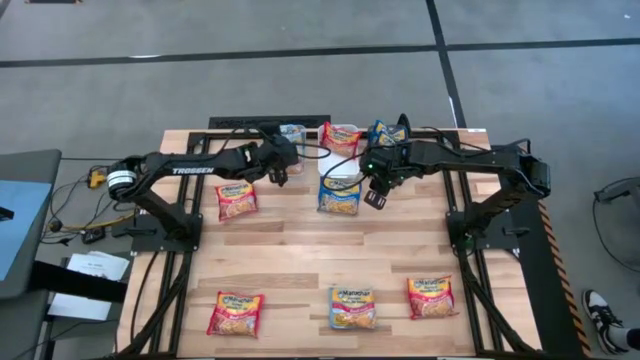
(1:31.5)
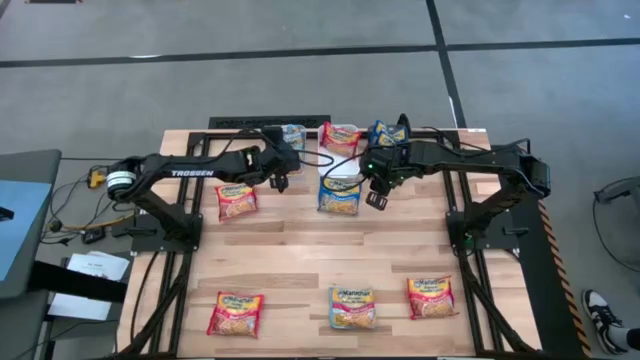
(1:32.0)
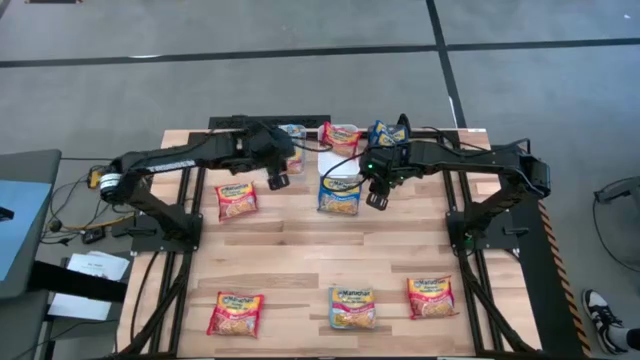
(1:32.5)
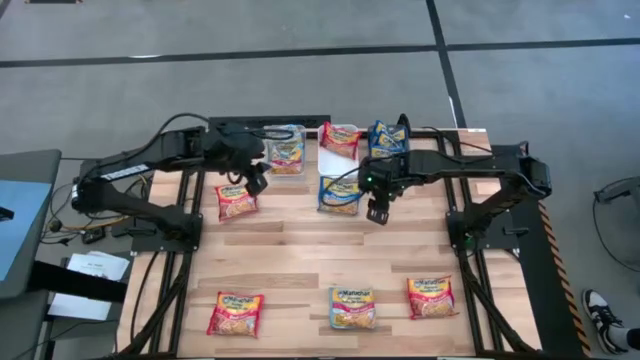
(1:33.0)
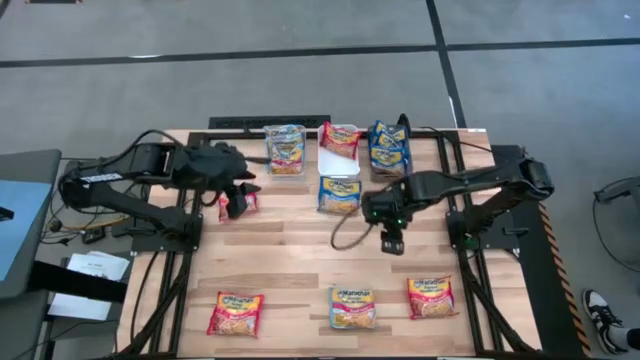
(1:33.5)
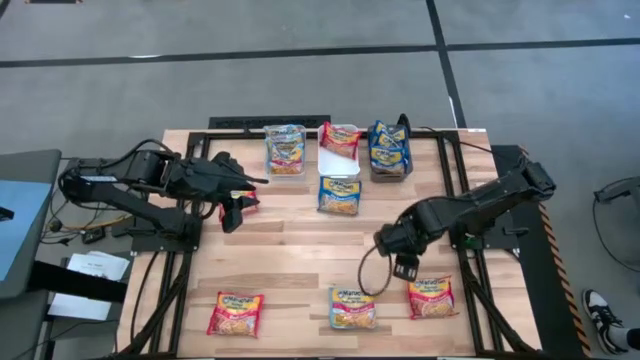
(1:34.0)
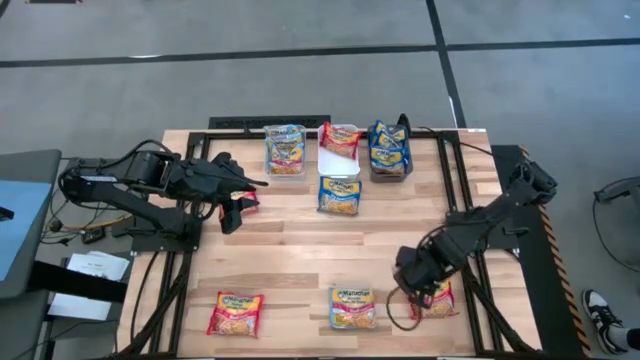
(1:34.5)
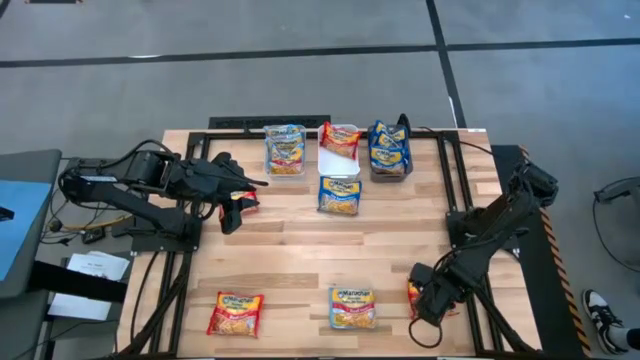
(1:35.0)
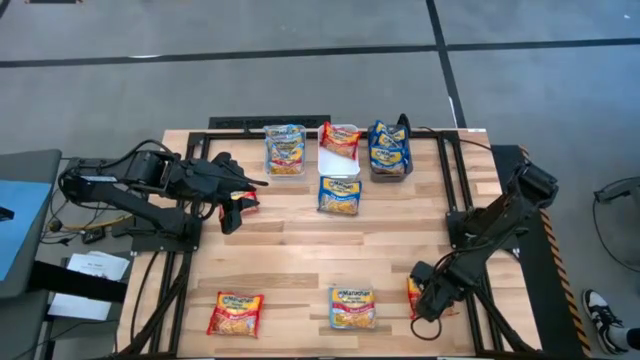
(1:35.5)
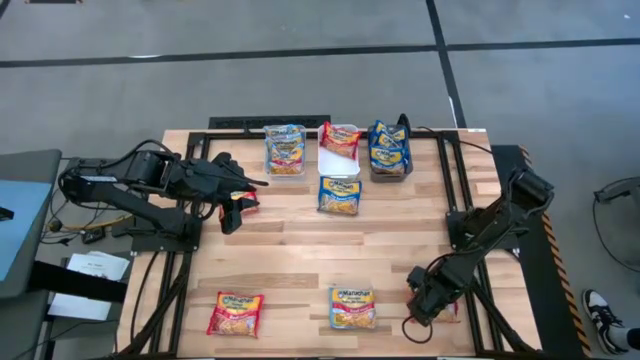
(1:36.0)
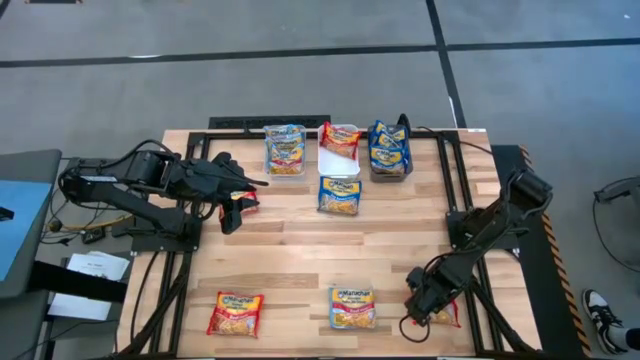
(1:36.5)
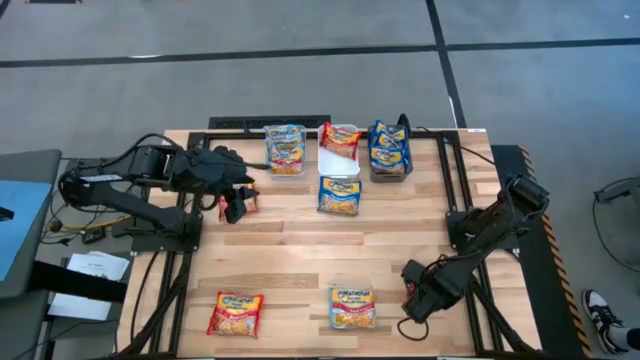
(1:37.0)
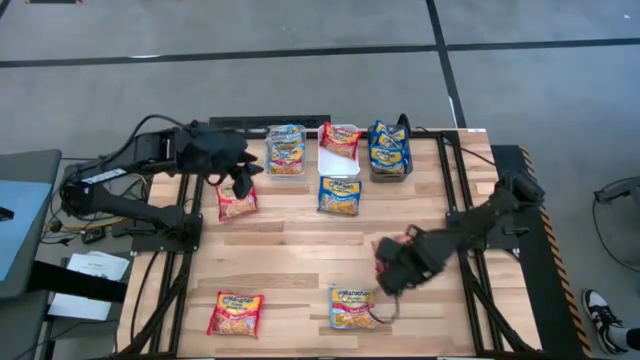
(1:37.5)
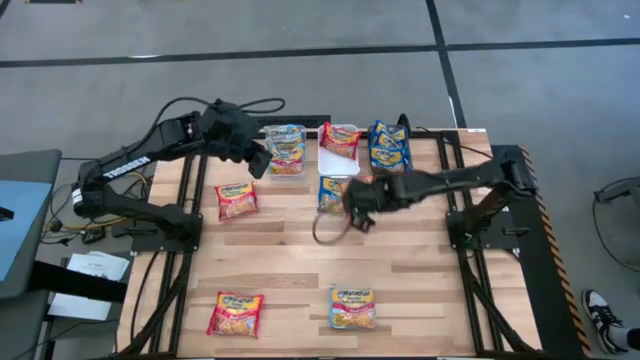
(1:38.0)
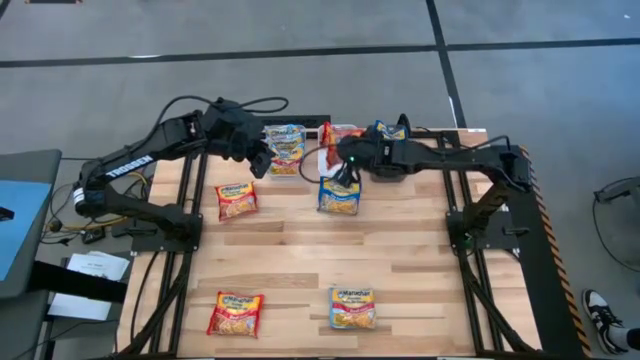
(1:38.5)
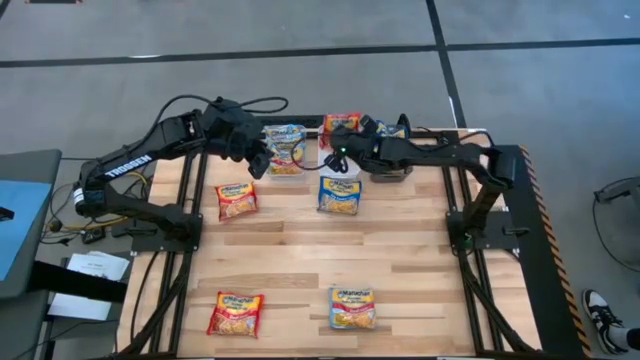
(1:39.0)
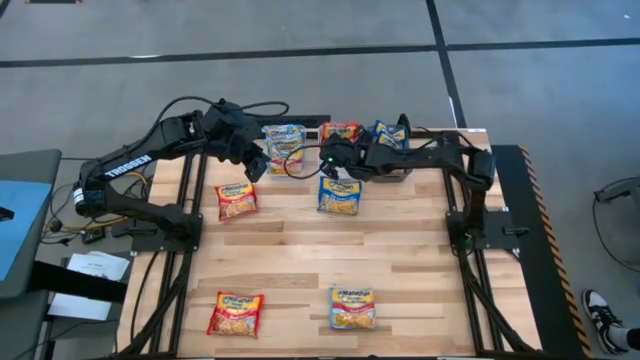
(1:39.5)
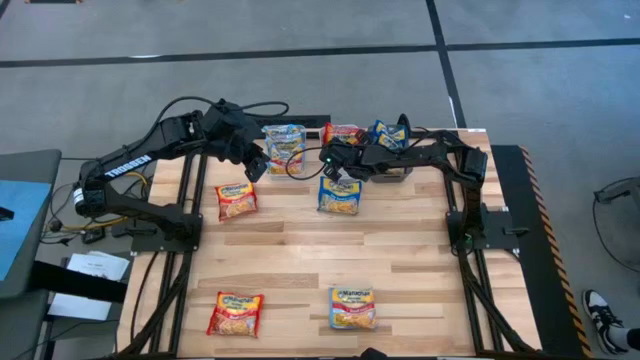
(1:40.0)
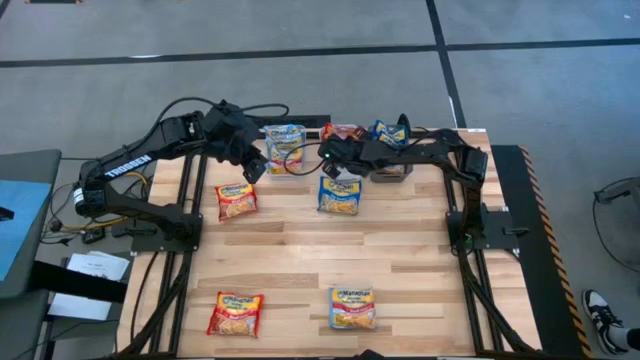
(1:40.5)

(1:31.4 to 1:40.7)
Task: Sort Maruchan noodles
Put the red noodle pack into the white bin

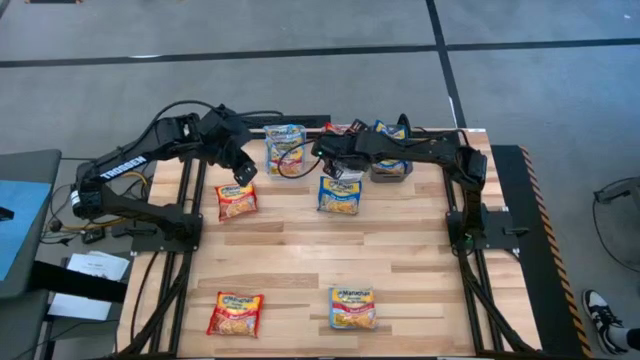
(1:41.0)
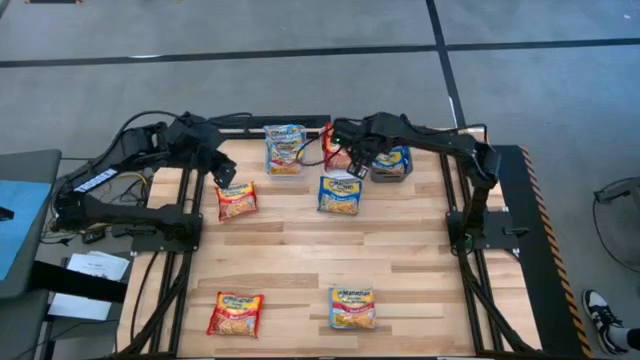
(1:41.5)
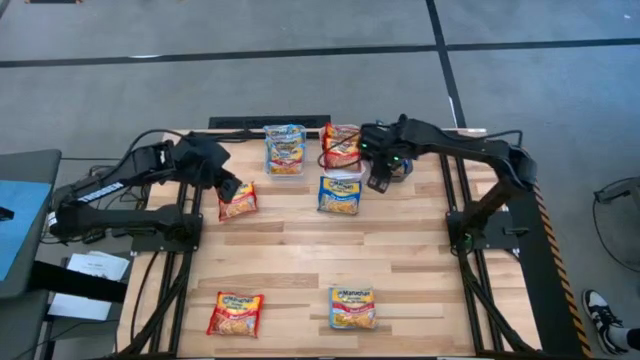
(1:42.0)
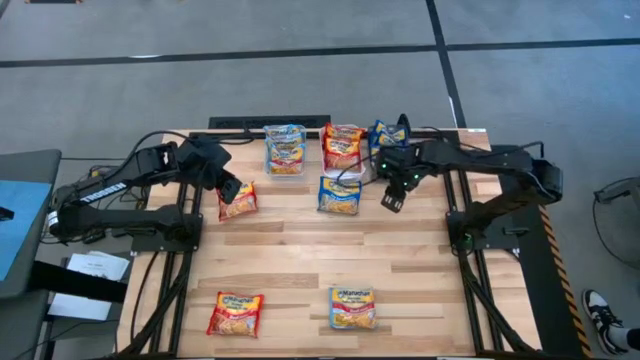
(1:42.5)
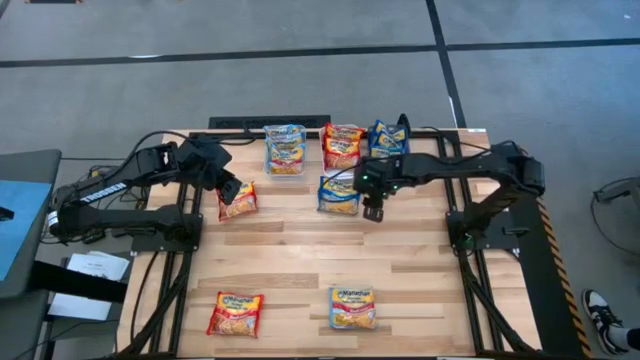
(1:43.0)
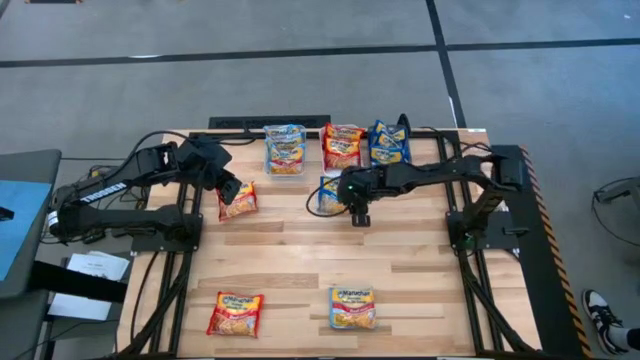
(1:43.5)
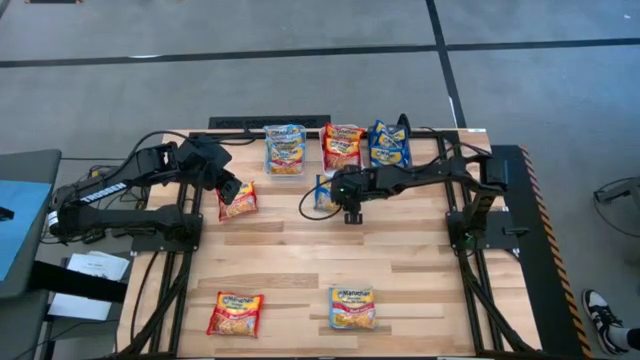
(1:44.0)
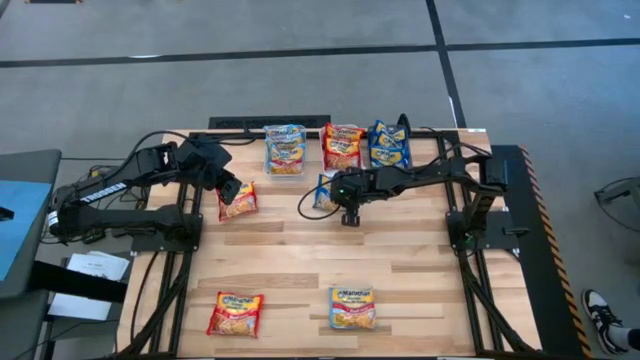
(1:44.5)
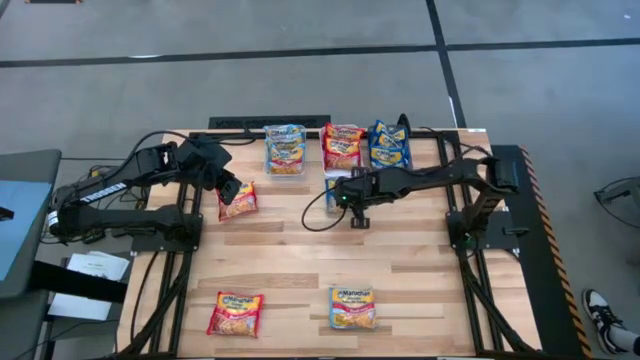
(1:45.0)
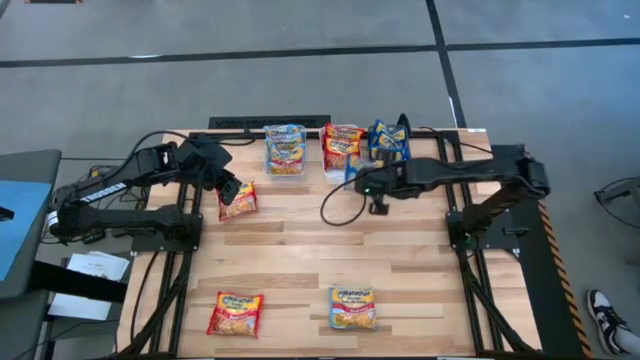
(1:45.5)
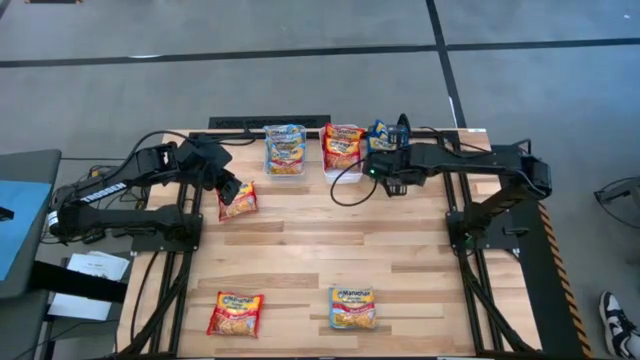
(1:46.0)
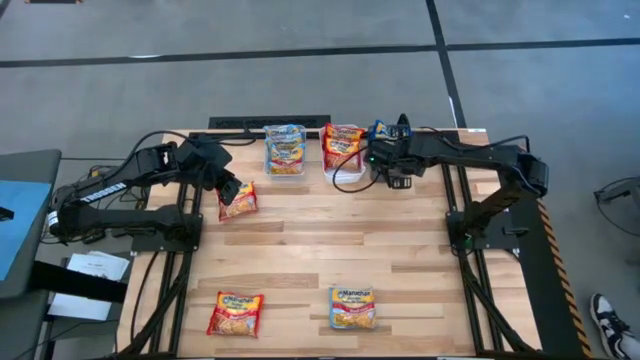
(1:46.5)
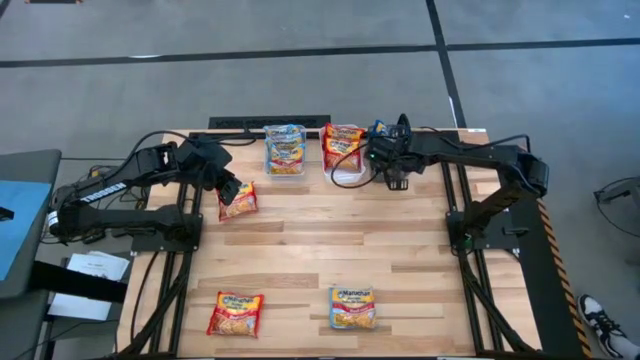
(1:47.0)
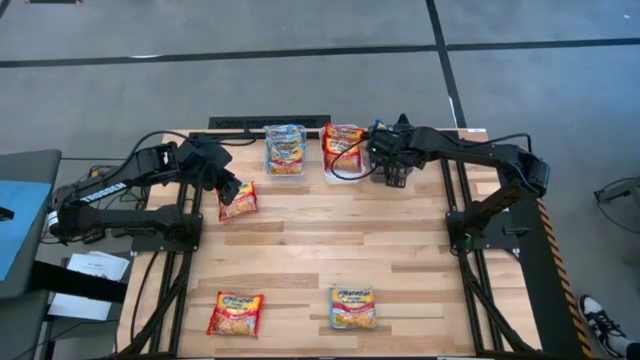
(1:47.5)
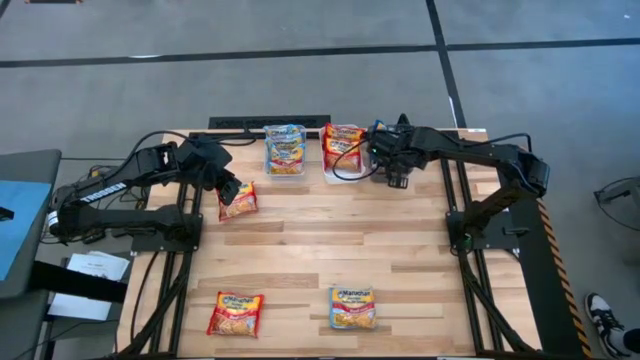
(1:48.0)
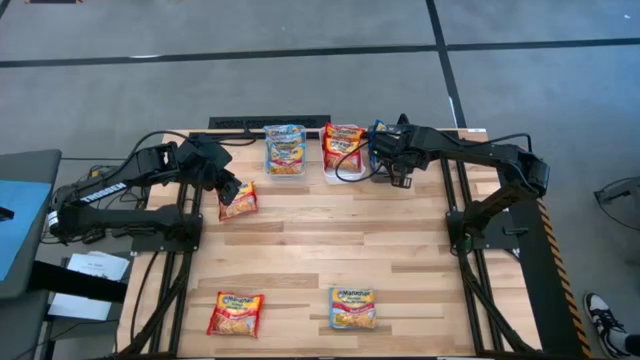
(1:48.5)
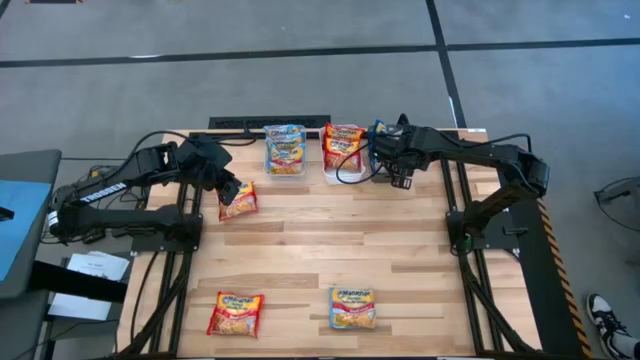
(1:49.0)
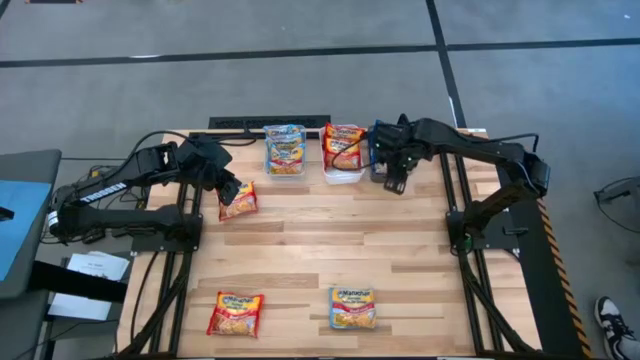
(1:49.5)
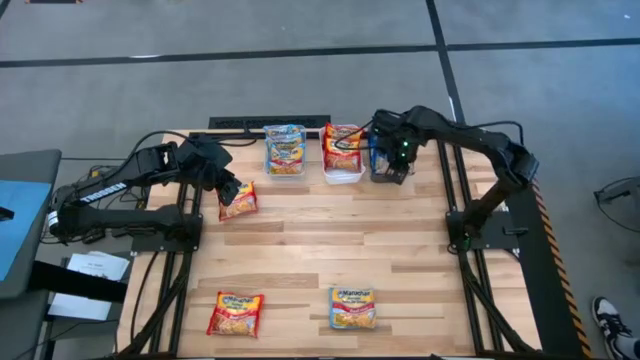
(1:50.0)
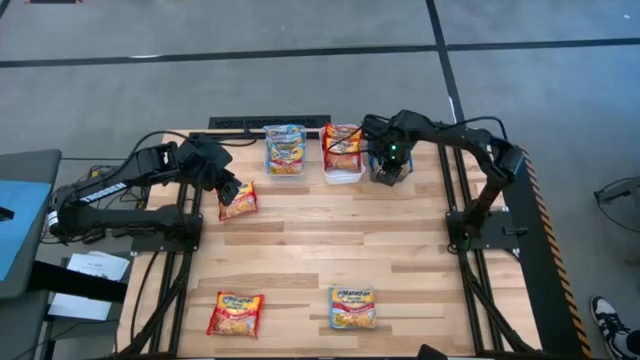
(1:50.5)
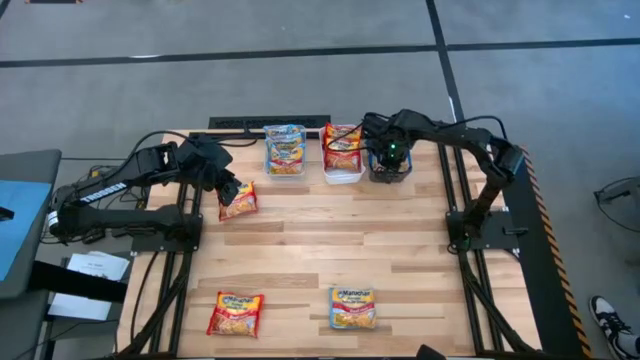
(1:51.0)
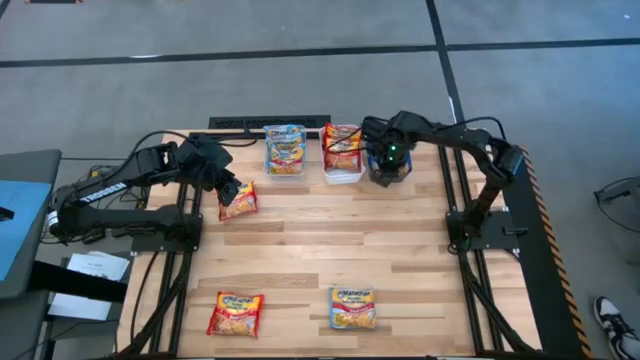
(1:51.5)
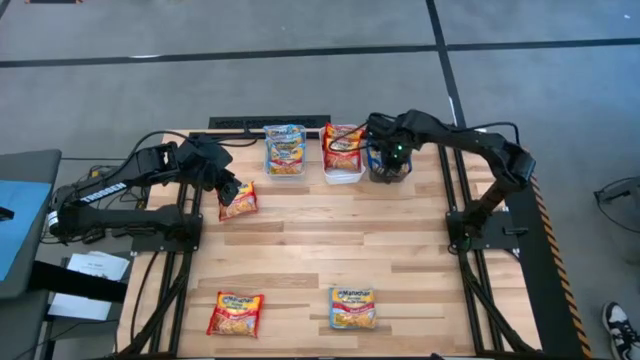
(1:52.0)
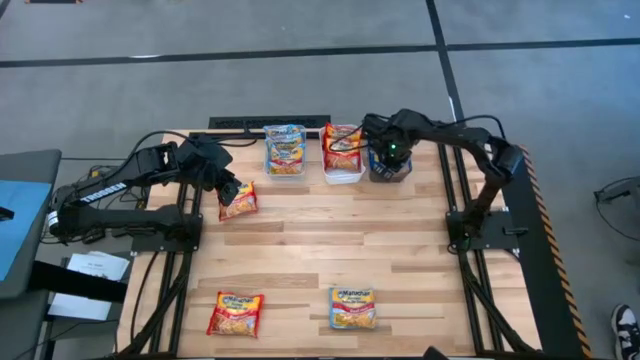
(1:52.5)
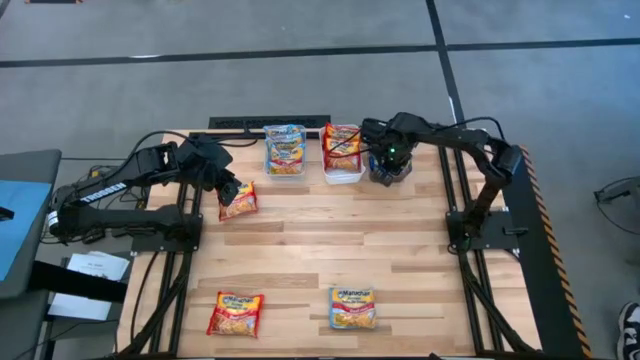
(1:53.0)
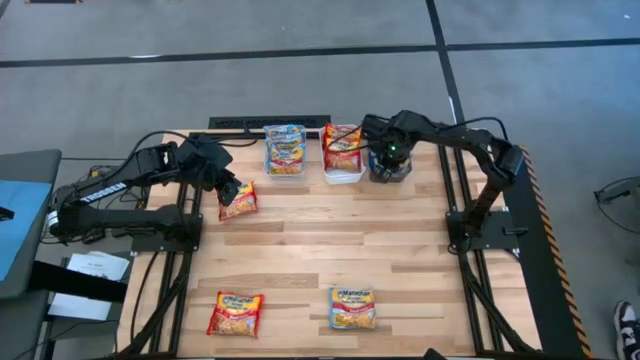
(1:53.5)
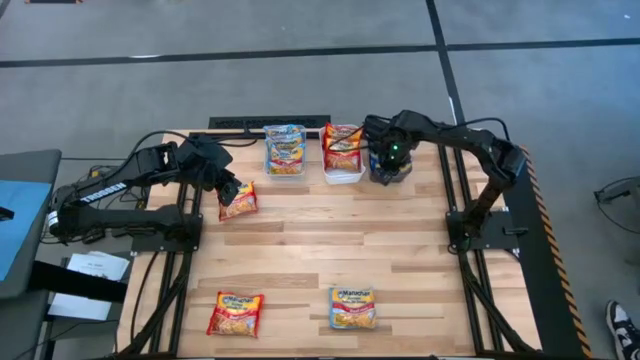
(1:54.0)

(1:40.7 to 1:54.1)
Put the blue noodle pack into the black bin
